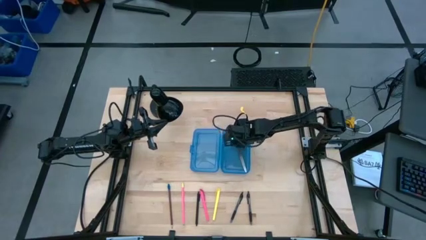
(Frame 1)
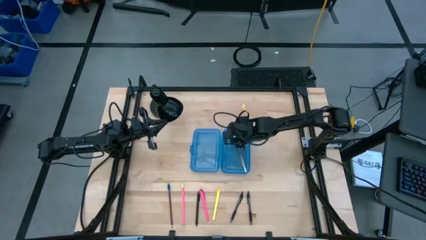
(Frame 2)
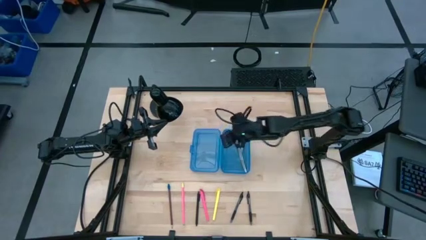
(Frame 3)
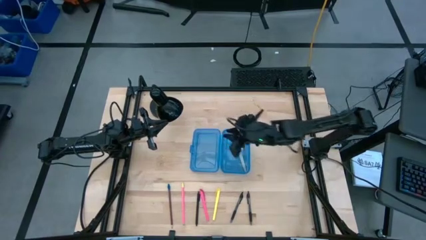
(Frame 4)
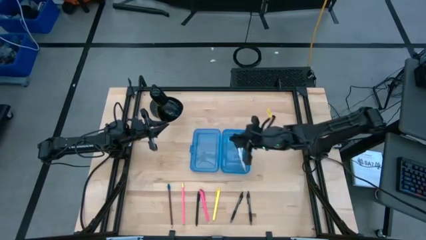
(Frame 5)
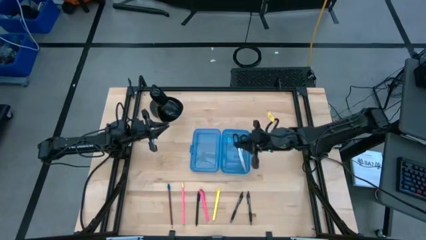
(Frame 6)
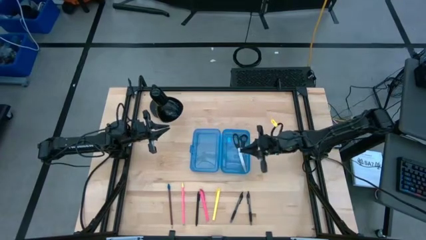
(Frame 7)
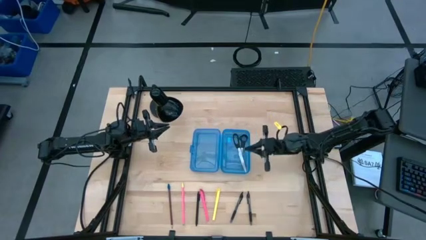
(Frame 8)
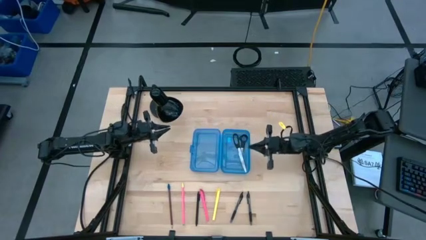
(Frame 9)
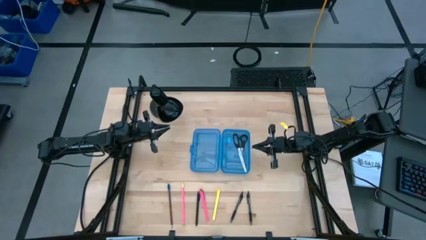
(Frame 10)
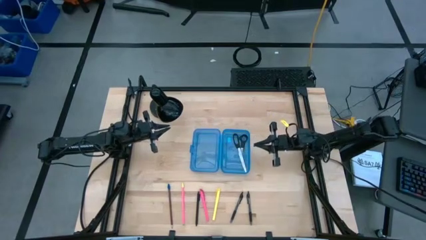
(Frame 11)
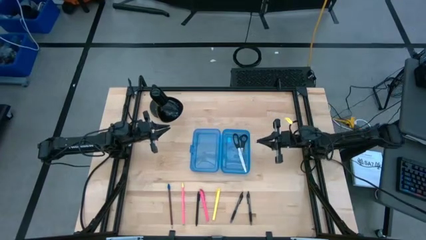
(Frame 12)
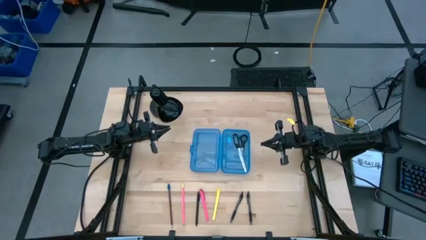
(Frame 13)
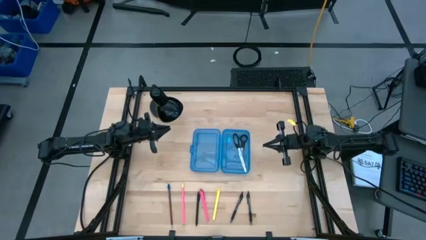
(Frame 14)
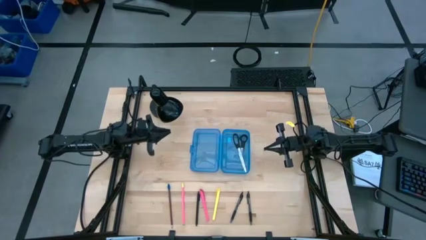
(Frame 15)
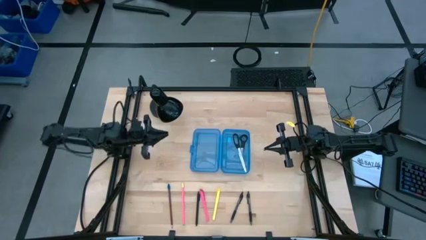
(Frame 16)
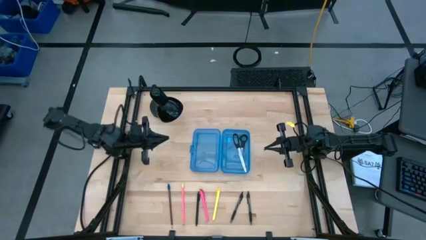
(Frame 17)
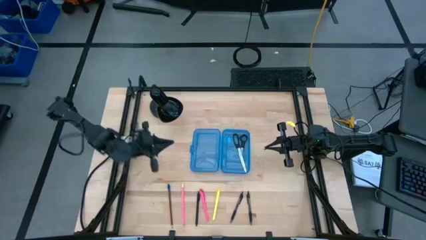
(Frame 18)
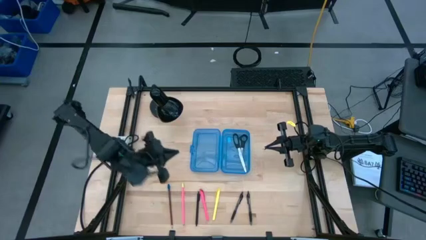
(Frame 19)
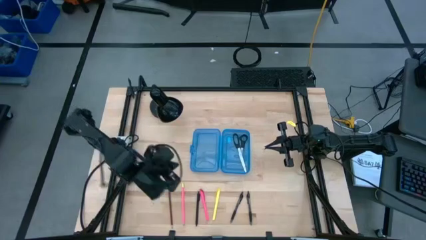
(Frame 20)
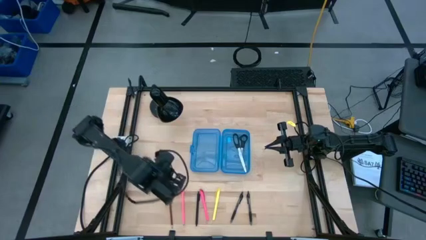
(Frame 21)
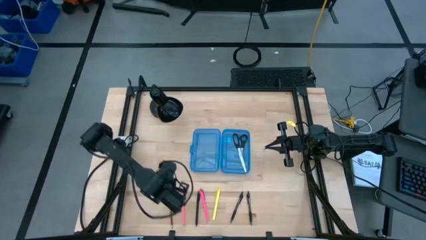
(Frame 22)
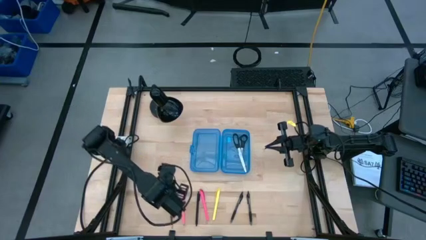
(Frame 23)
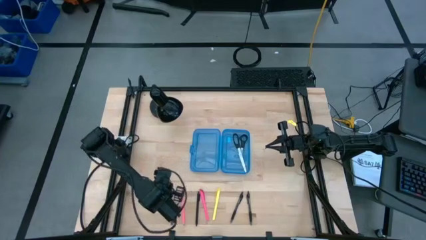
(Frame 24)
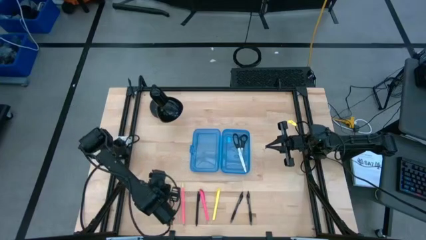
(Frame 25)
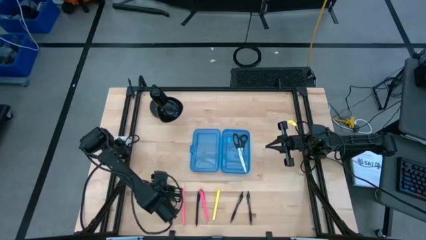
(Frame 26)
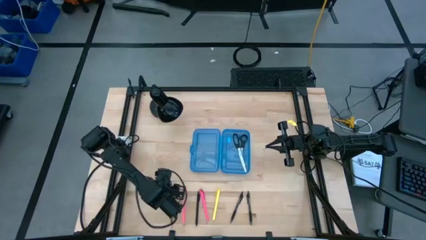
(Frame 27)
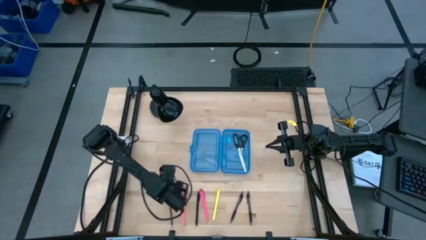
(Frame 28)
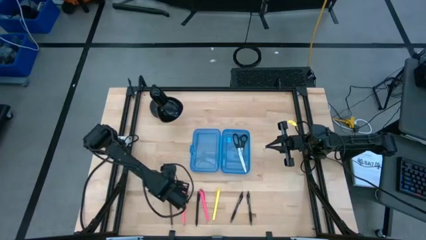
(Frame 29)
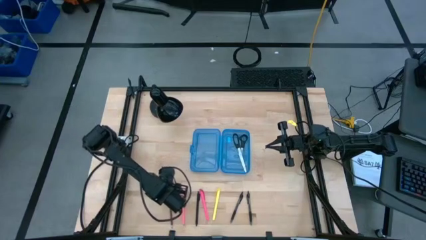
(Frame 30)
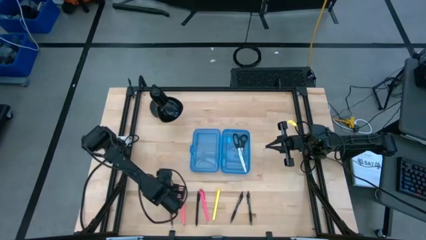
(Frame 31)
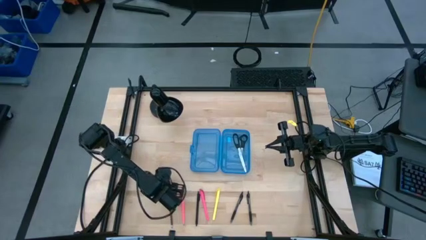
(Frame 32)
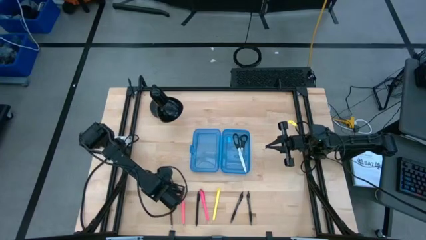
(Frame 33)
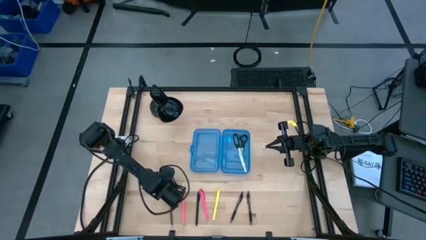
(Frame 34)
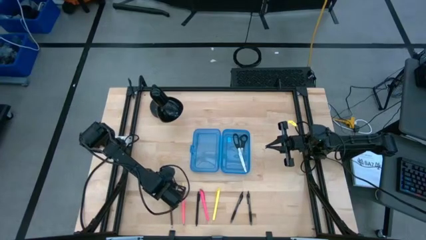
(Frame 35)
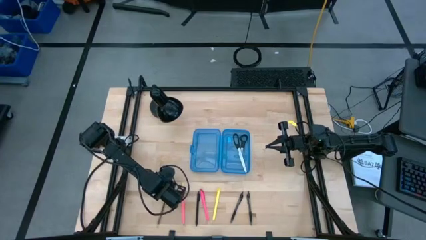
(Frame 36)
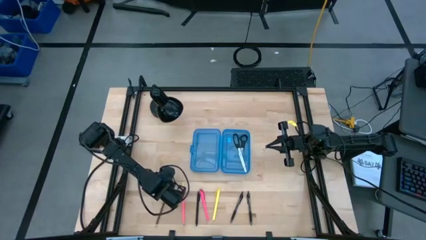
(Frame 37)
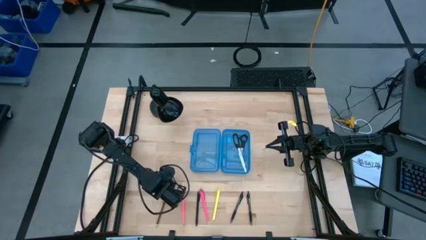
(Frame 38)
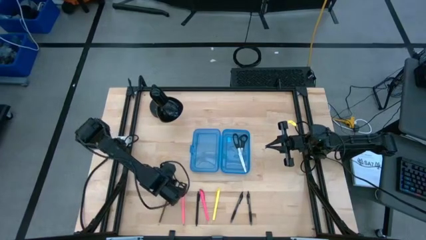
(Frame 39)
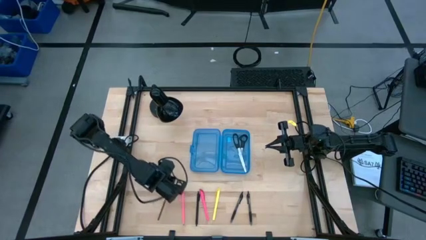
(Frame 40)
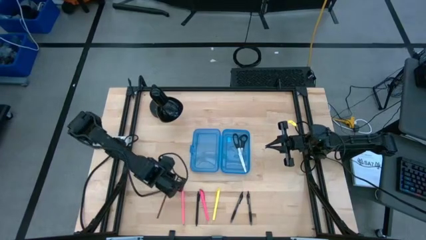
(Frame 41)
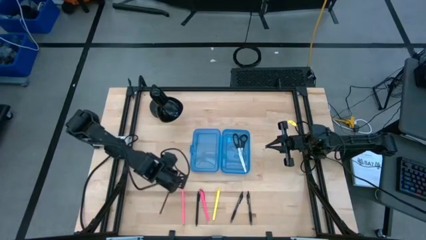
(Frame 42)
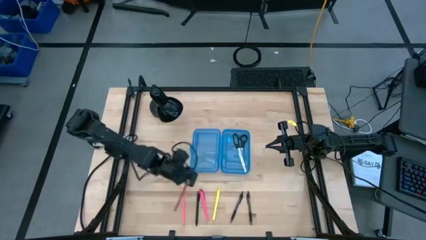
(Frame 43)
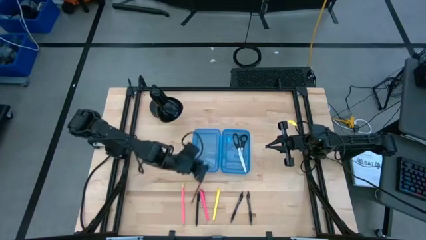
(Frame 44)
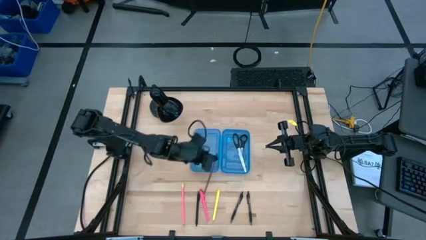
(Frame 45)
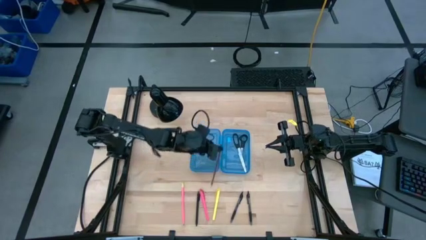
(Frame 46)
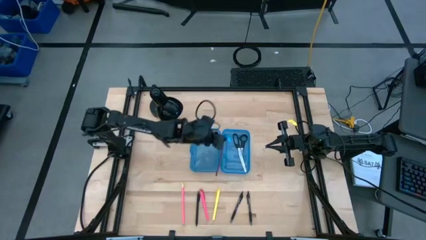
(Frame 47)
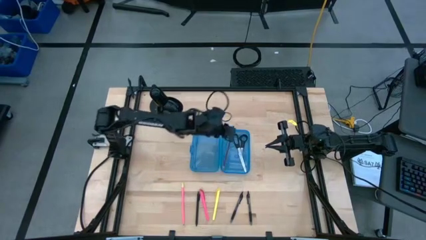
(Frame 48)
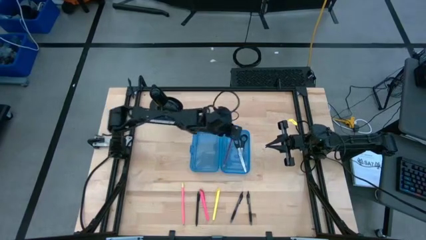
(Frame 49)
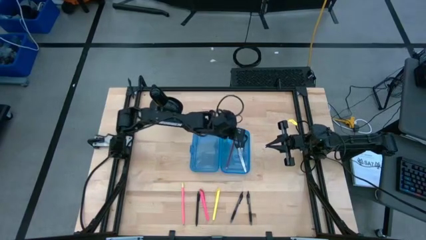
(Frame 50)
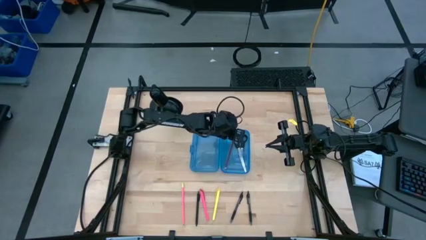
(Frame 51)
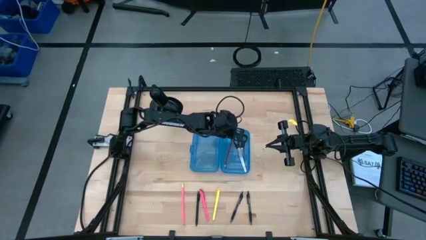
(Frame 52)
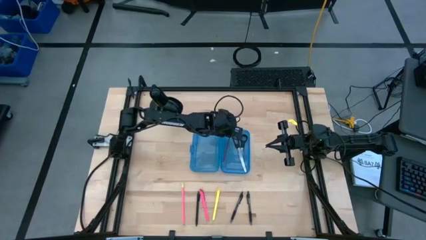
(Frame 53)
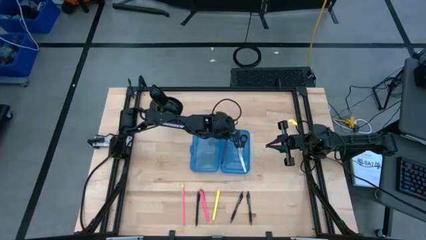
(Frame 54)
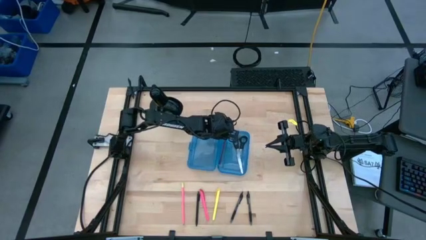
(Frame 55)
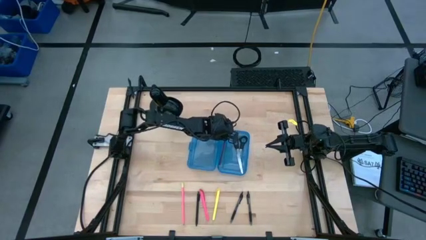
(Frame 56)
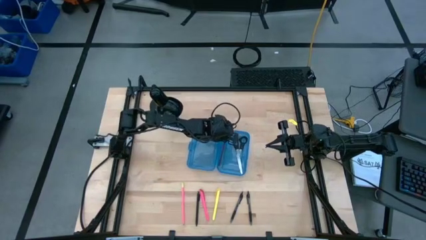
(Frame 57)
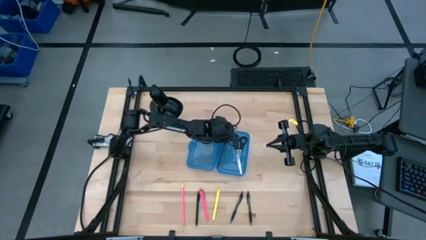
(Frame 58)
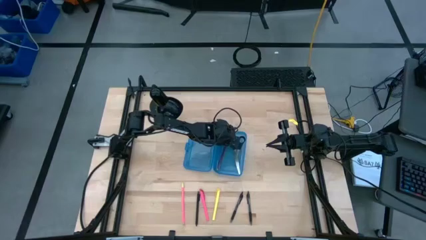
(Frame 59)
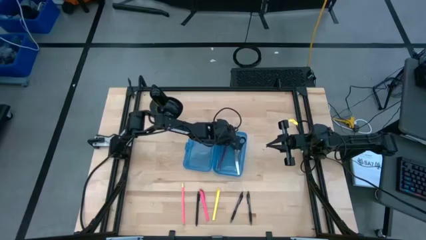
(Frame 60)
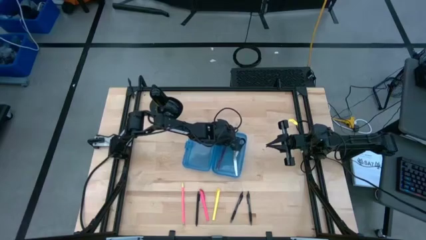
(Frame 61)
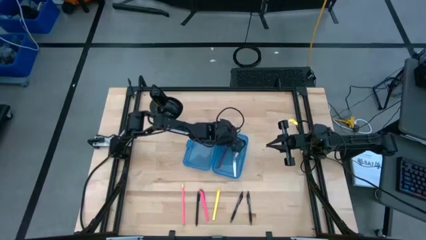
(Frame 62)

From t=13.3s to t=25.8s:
Task: Pick & place school supplies into a supply box
Put the brown pencil into the supply box

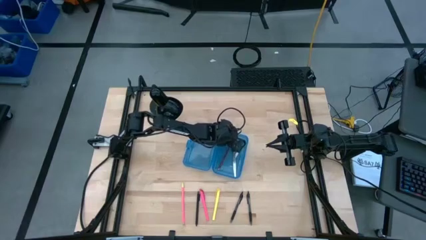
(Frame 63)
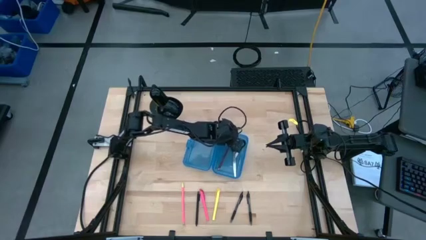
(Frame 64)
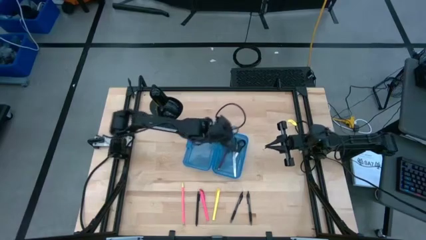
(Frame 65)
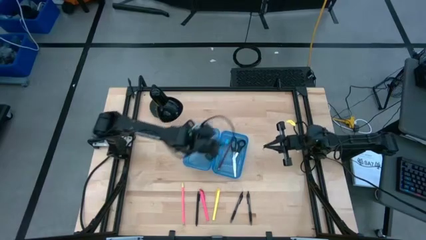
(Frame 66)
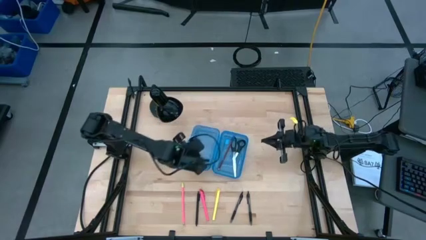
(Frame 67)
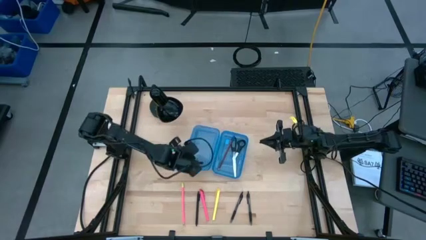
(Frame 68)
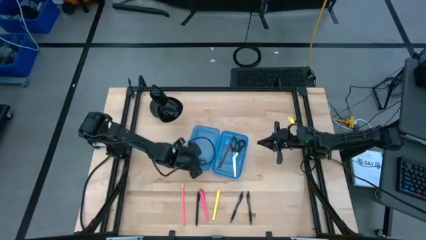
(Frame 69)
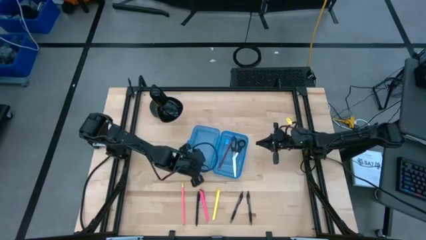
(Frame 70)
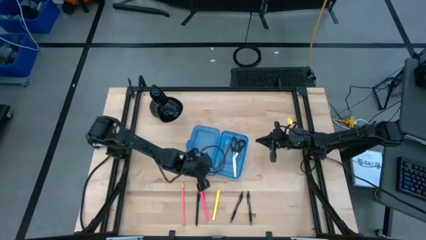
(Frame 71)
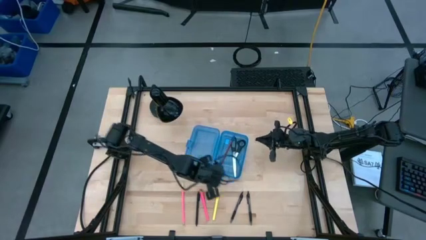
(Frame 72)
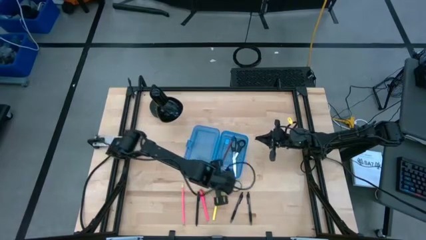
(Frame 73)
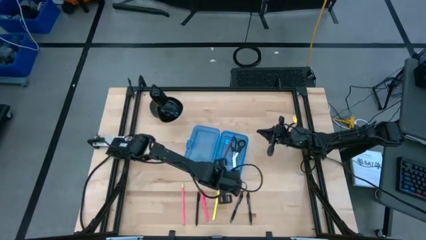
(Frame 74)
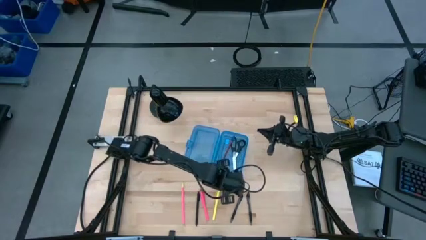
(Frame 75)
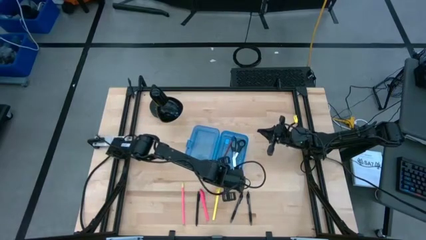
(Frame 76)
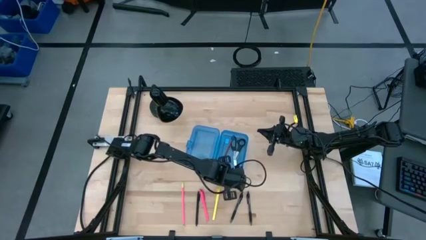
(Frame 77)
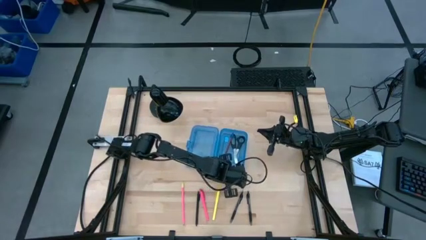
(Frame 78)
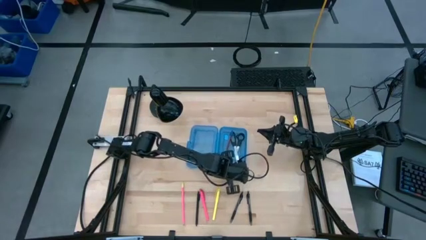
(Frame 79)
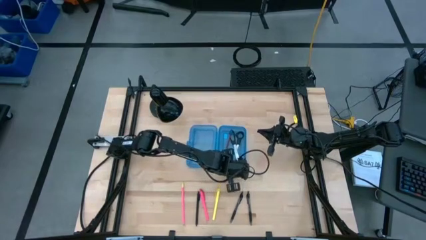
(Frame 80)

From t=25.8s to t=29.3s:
Adjust the supply box
